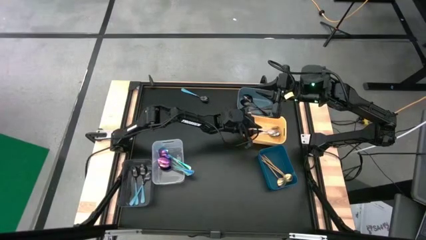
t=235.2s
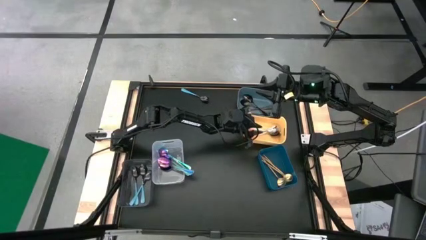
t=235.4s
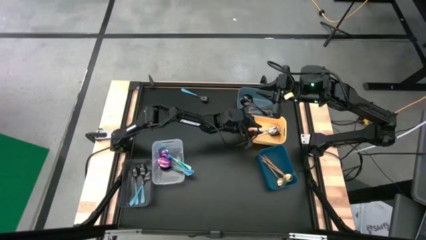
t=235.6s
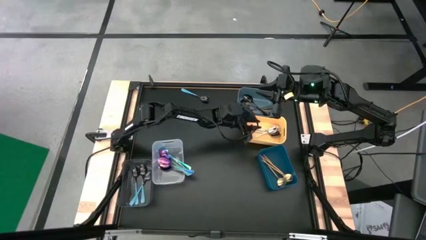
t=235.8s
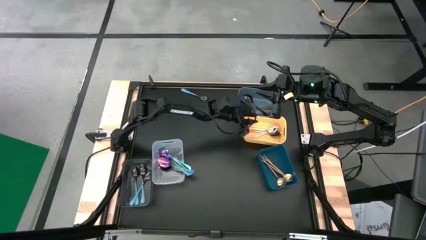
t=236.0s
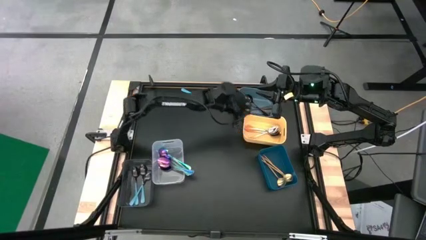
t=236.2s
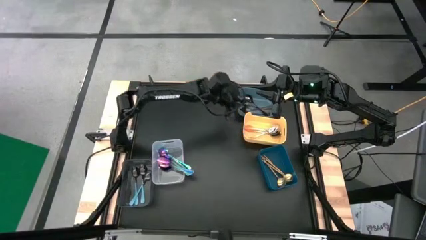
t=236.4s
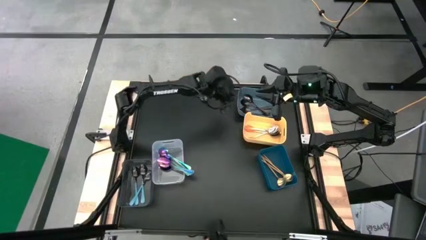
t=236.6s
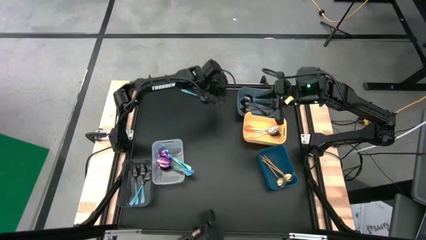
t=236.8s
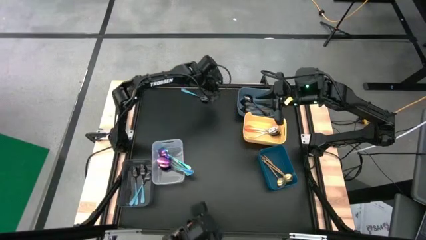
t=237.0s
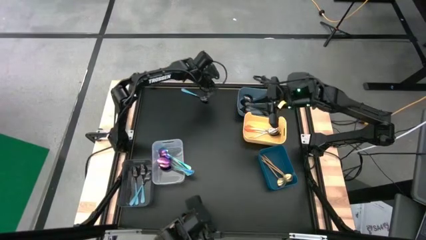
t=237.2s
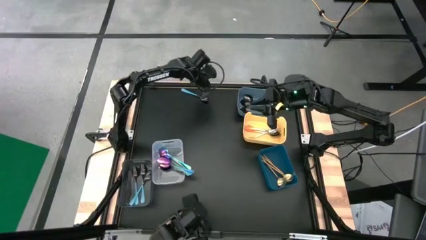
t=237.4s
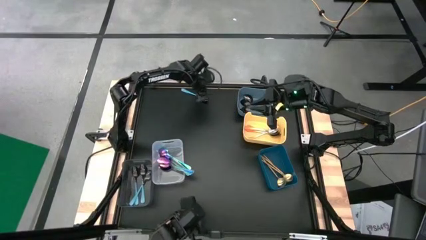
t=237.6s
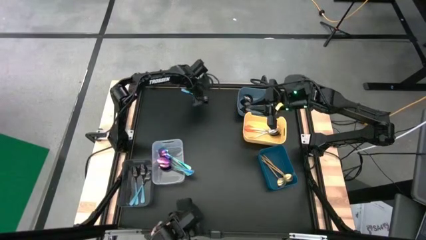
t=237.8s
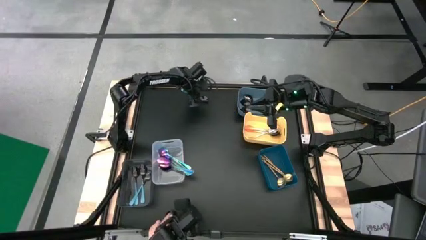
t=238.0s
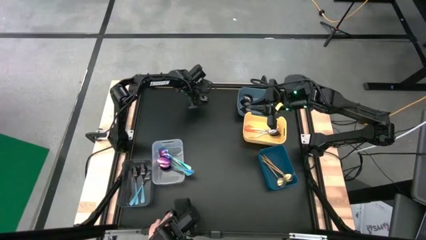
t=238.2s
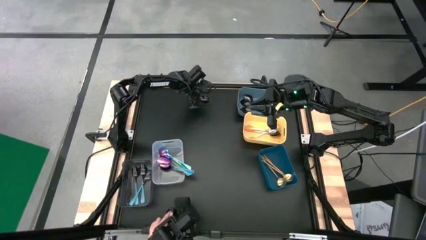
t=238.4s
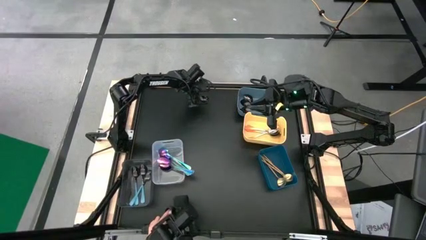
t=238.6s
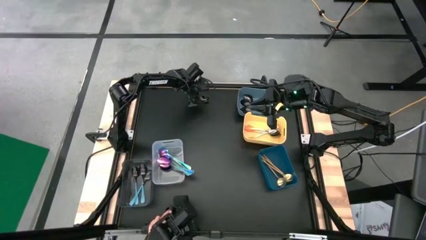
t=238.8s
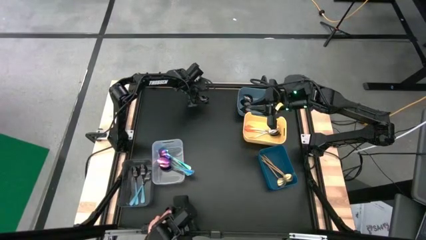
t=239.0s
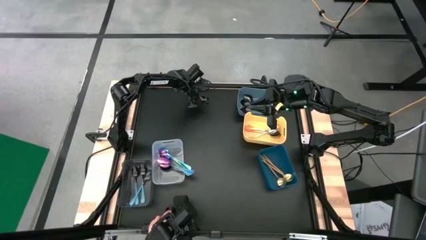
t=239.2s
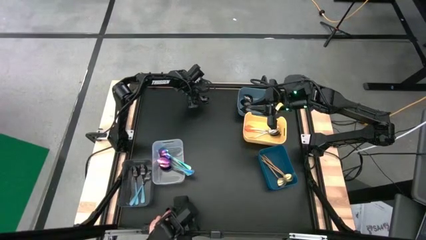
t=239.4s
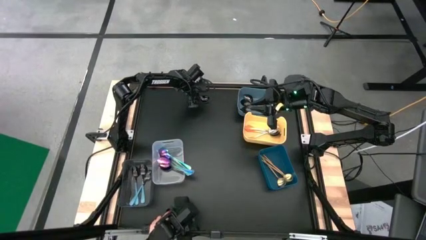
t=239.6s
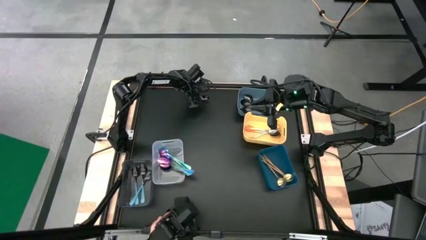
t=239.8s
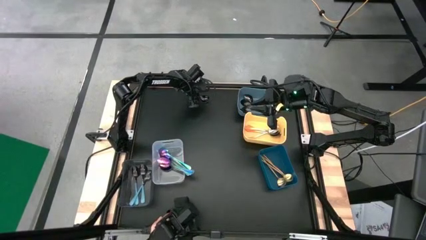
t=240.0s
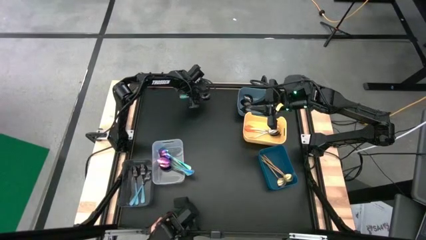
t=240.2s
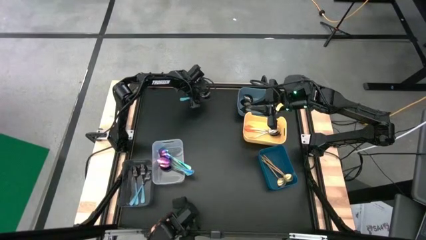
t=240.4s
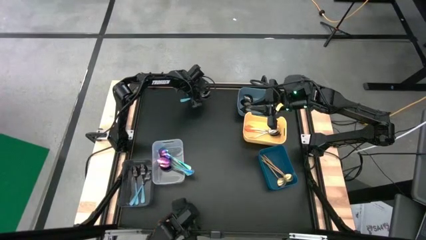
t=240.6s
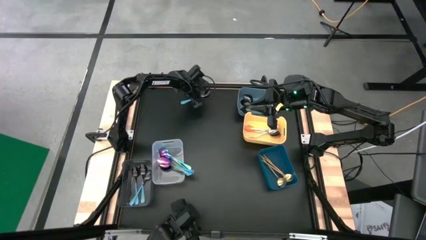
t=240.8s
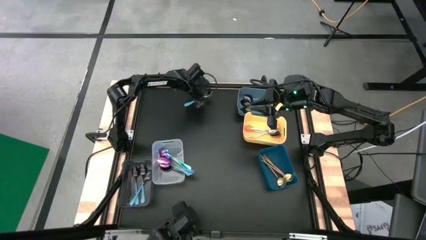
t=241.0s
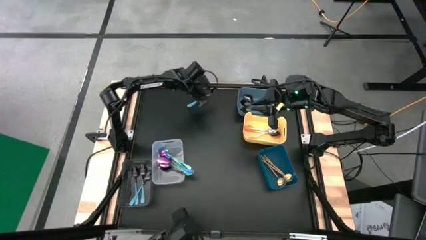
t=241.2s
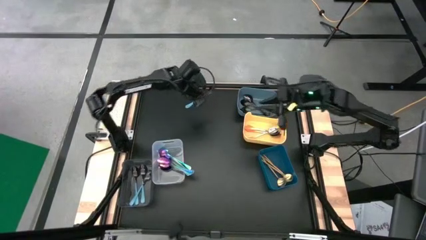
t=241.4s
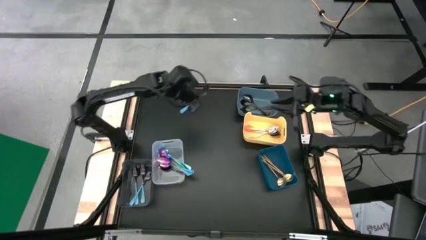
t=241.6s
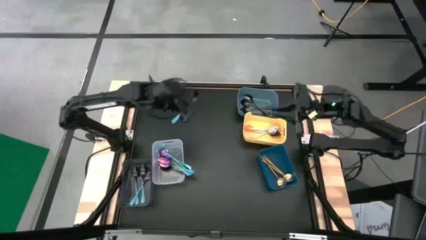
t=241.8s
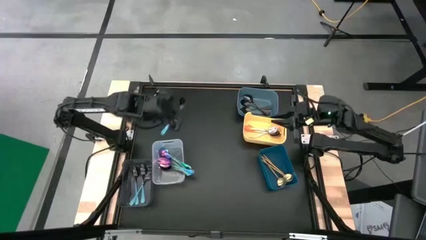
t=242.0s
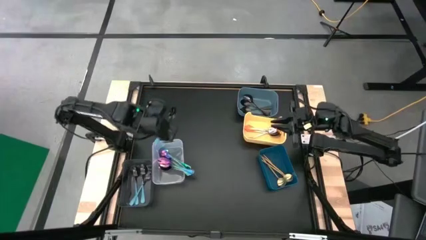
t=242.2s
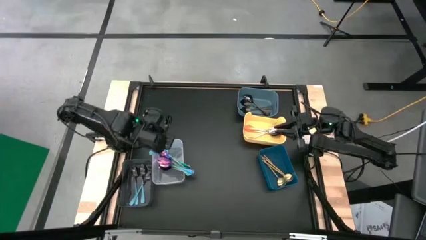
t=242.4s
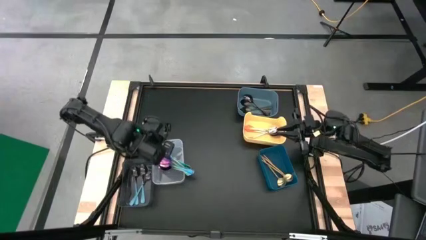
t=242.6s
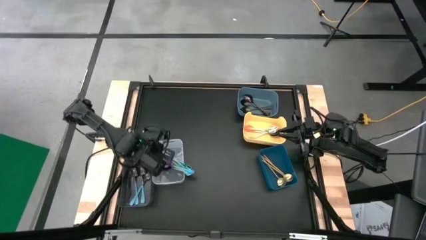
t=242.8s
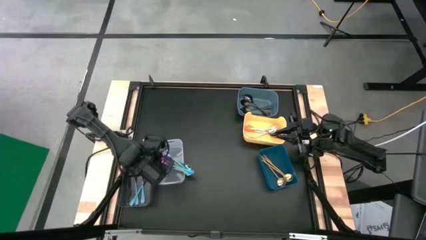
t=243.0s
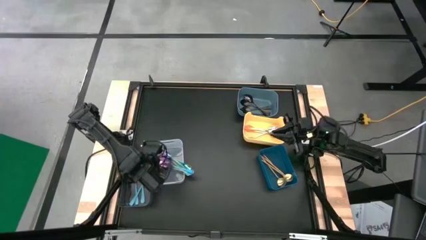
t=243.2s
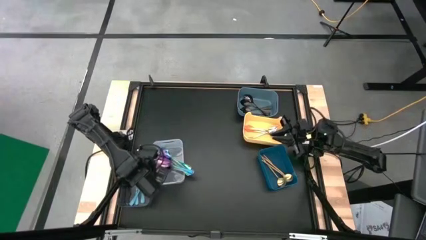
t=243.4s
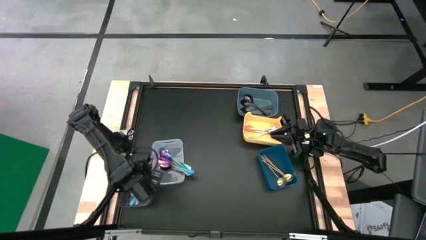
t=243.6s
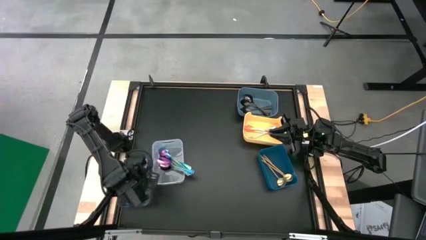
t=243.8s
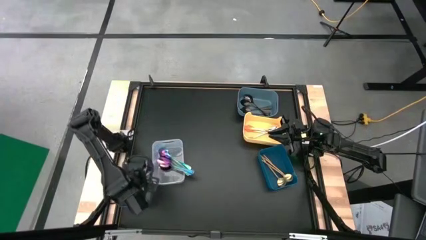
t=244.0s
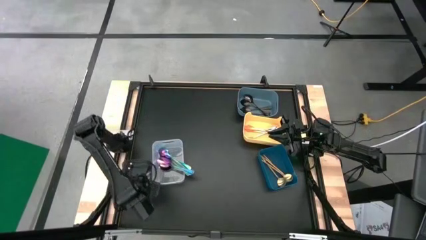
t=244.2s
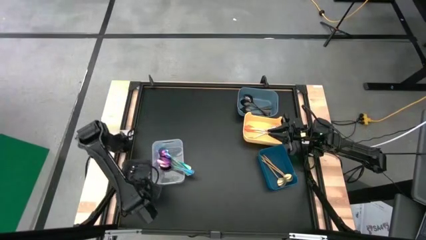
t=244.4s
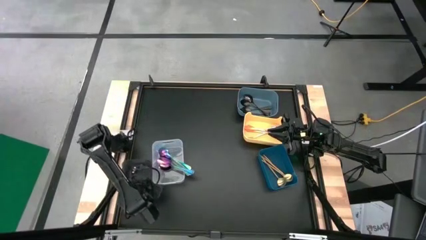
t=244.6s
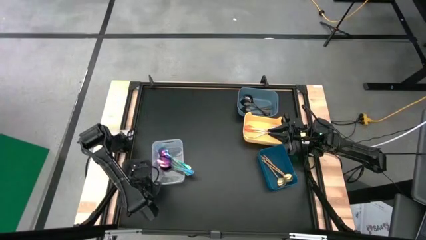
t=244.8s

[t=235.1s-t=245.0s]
Task: Sort silverware by color (type)
Put the light blue spoon into the black bin

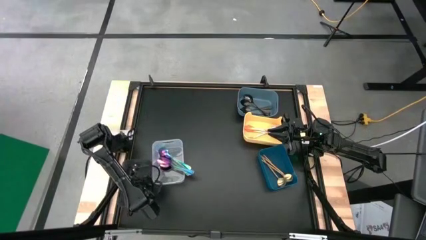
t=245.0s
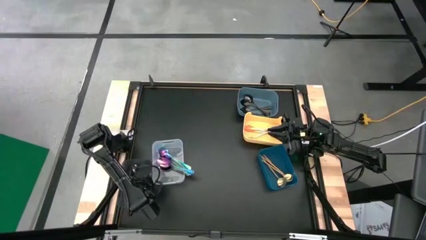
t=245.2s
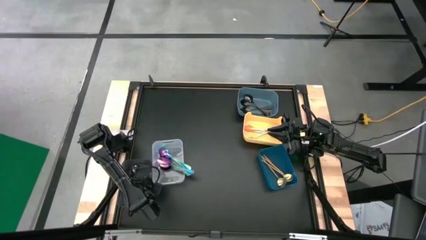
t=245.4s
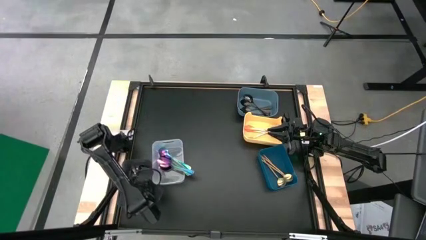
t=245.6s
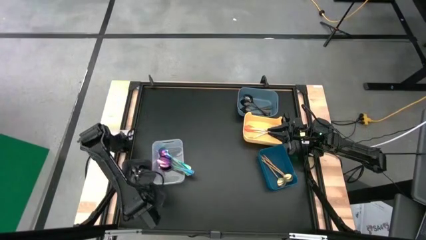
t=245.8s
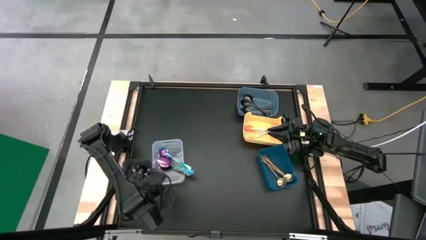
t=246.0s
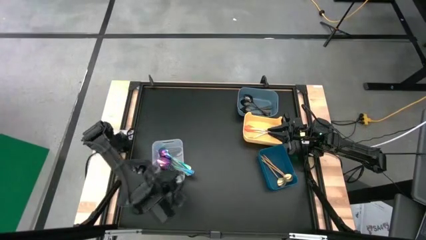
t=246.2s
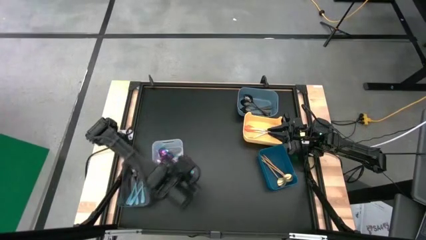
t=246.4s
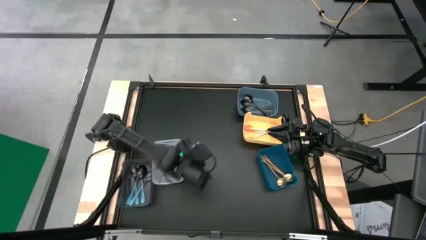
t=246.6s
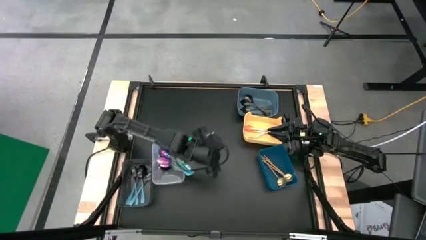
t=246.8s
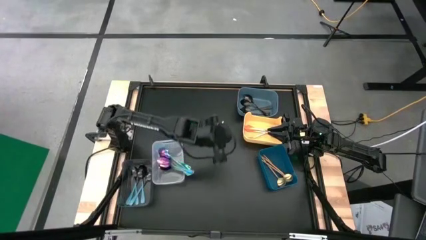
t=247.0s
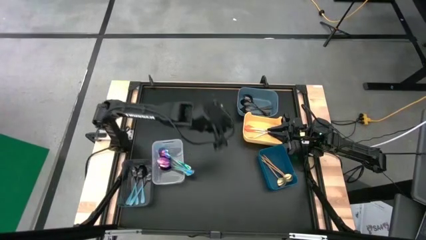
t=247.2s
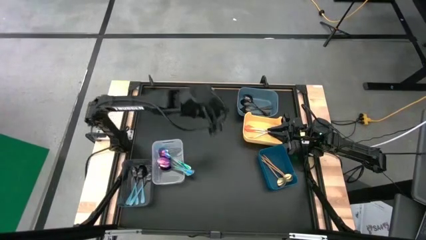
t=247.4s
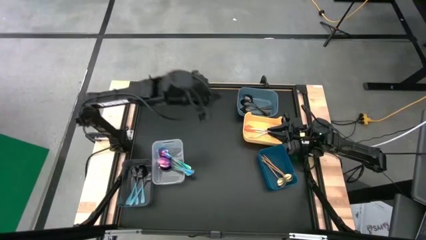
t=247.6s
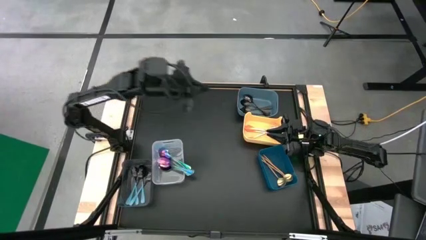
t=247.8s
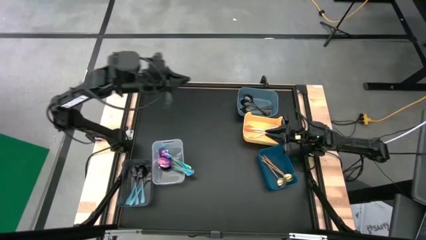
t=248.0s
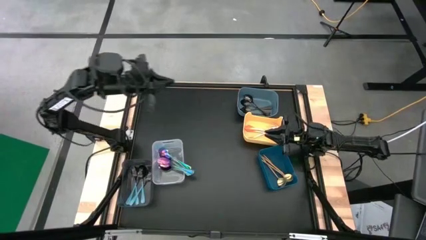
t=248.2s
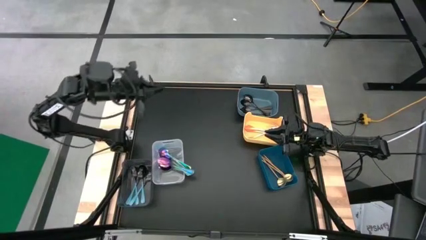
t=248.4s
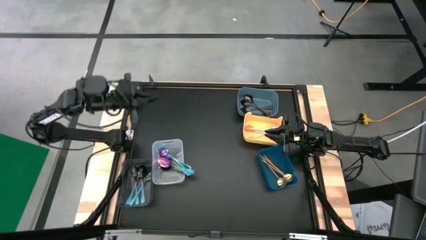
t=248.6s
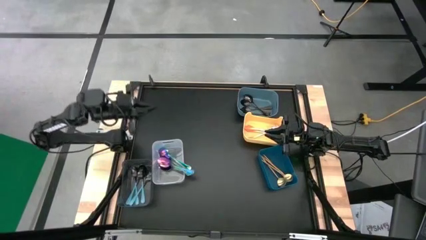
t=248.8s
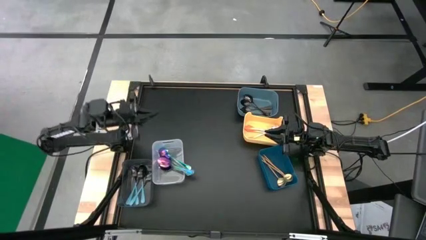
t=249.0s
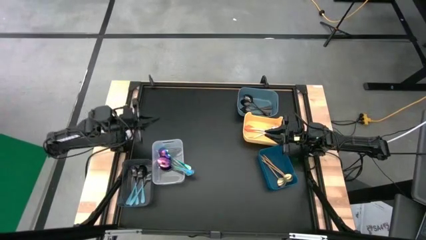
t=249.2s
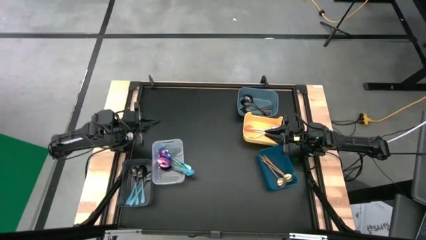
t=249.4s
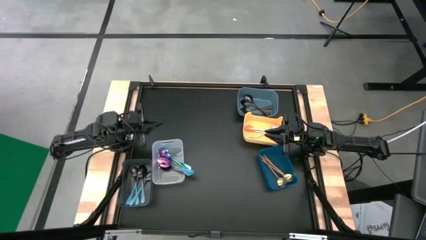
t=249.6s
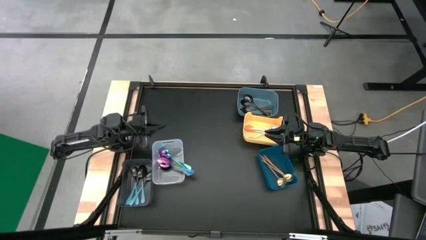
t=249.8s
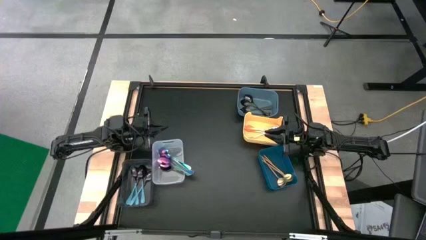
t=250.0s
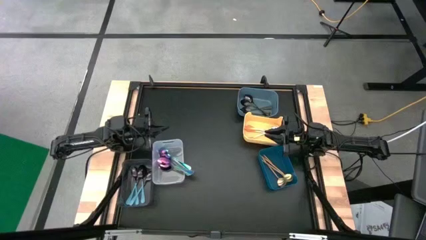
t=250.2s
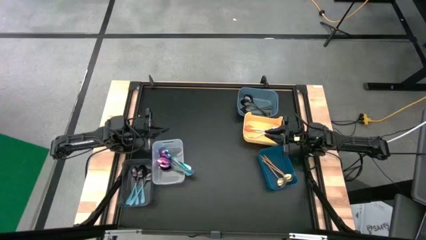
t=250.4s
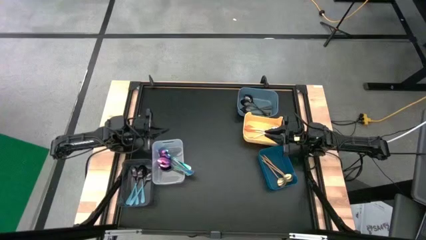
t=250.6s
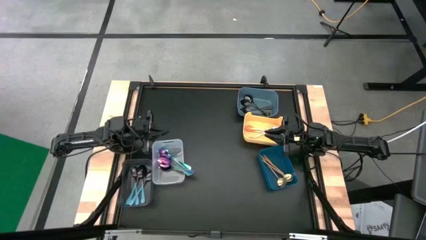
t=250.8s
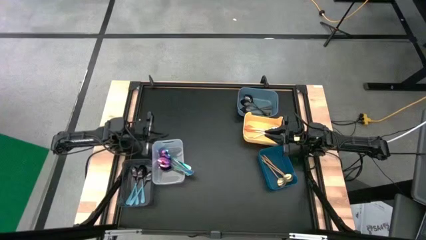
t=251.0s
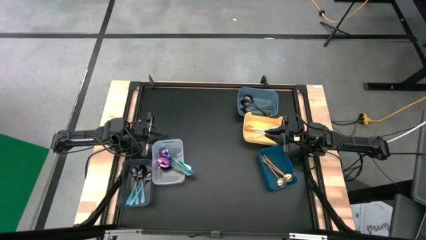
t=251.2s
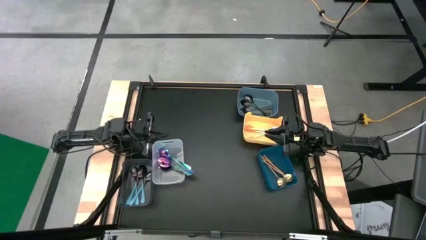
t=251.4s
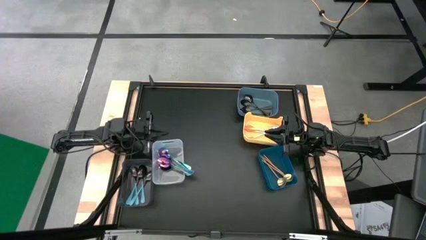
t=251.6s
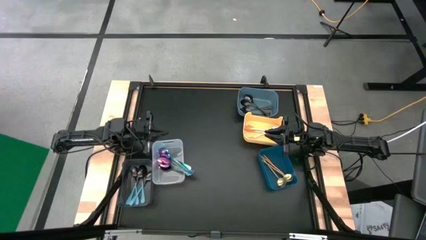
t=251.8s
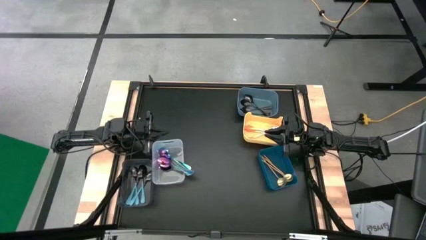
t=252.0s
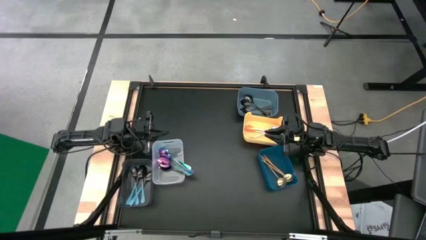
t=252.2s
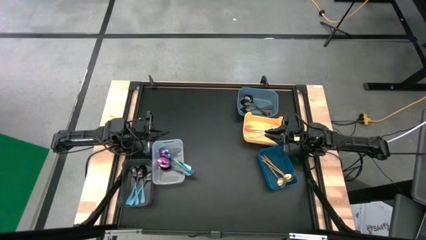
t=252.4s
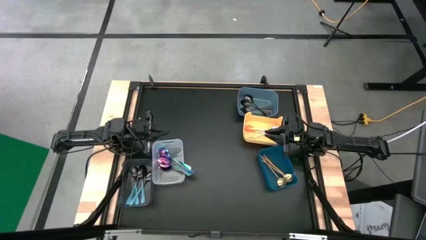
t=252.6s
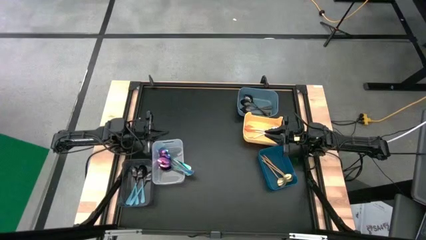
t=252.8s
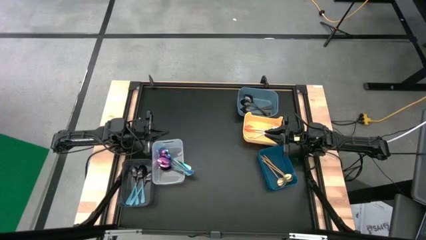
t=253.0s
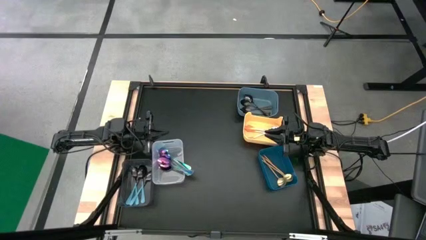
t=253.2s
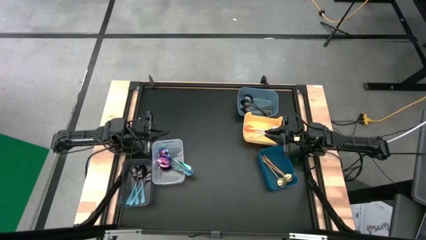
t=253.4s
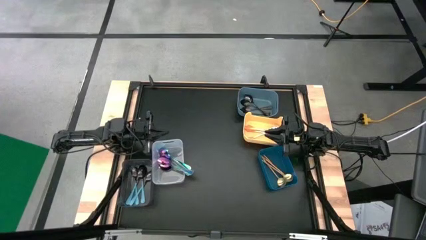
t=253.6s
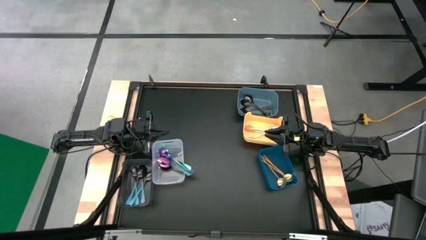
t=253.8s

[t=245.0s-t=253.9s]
Return to Home Position
